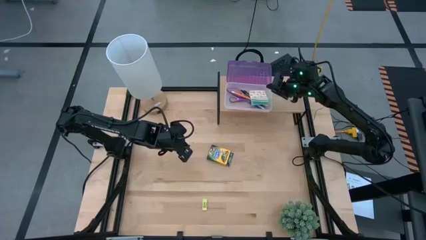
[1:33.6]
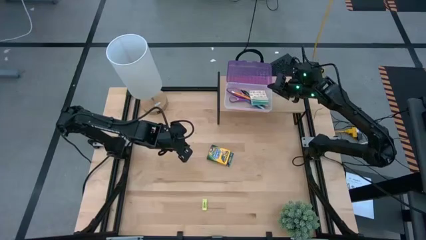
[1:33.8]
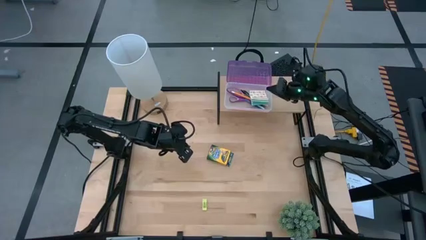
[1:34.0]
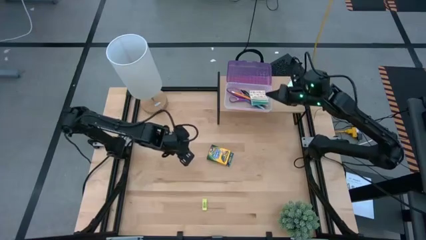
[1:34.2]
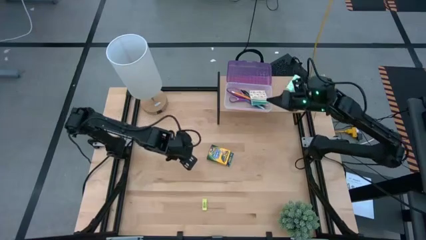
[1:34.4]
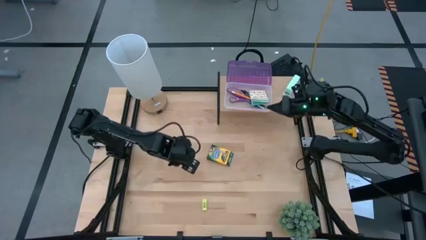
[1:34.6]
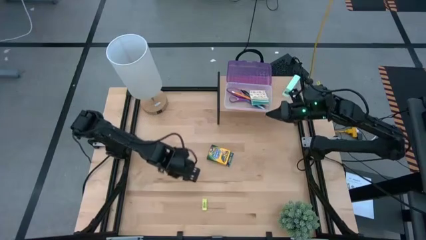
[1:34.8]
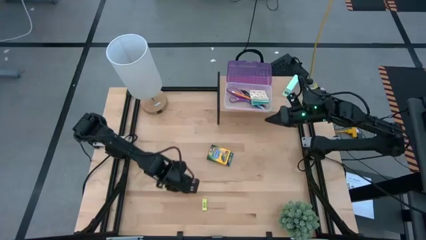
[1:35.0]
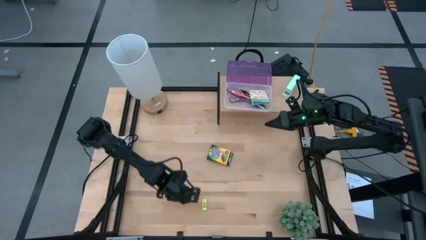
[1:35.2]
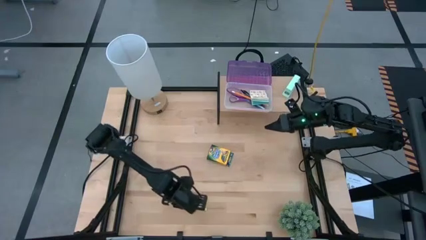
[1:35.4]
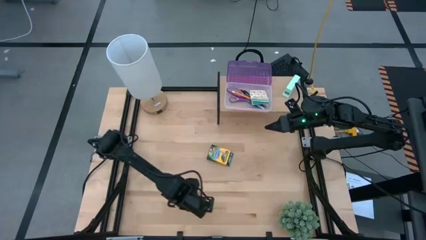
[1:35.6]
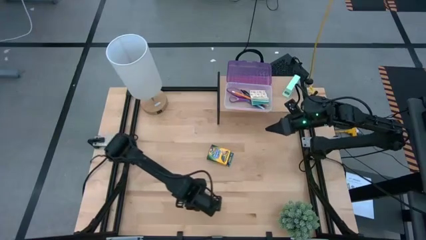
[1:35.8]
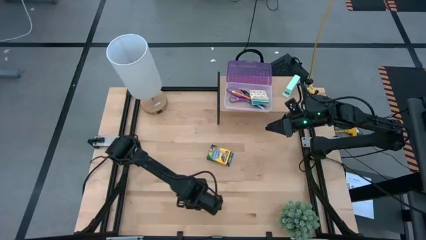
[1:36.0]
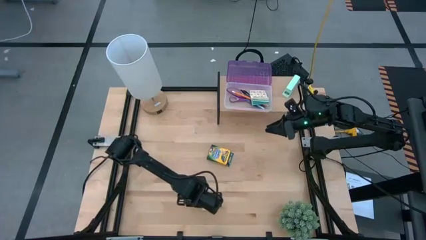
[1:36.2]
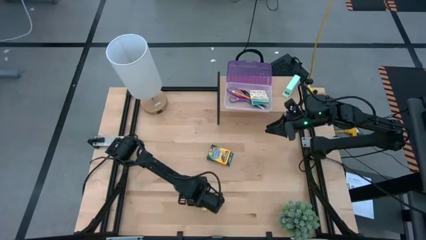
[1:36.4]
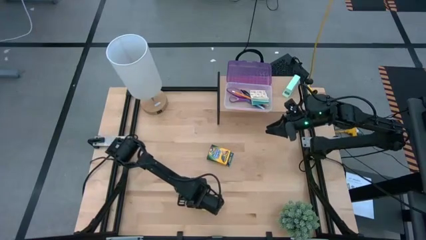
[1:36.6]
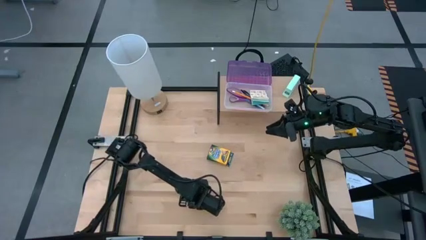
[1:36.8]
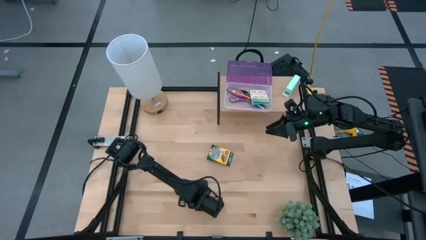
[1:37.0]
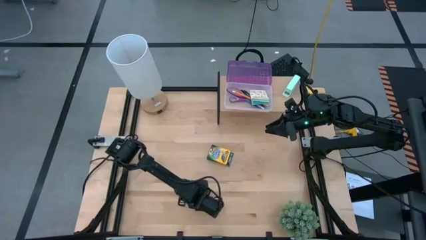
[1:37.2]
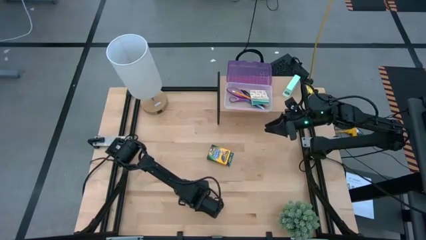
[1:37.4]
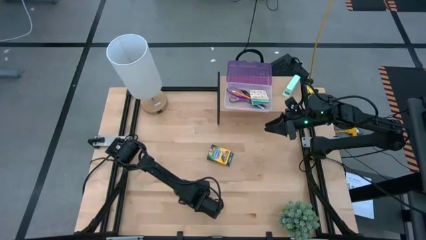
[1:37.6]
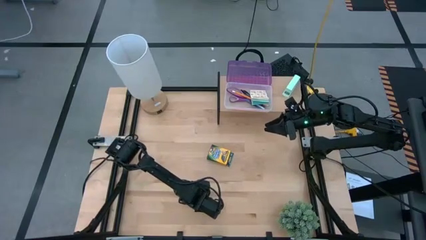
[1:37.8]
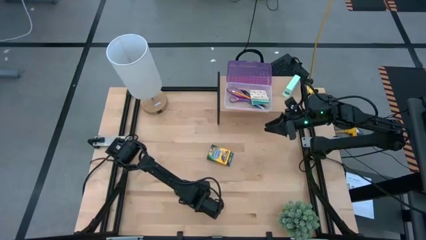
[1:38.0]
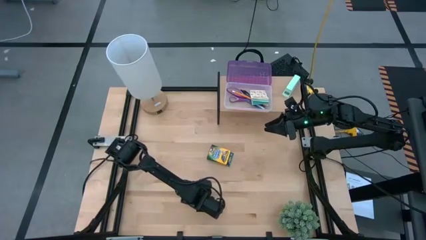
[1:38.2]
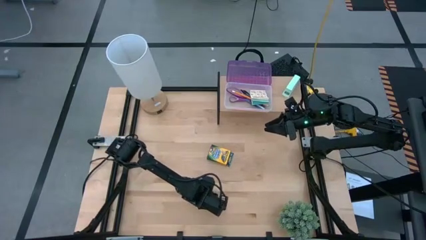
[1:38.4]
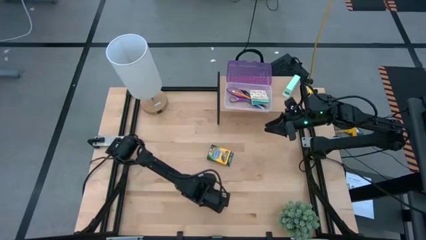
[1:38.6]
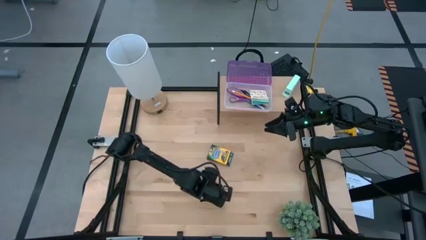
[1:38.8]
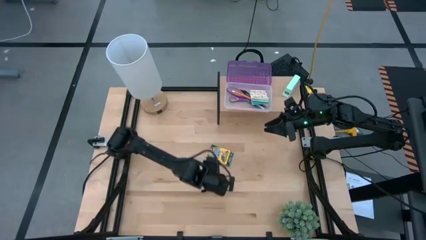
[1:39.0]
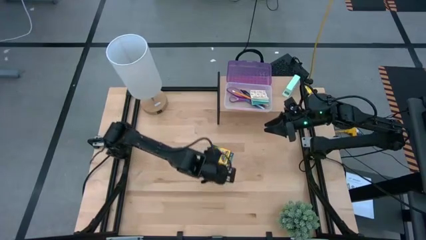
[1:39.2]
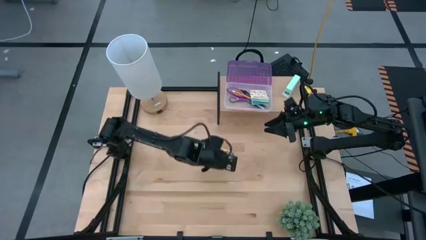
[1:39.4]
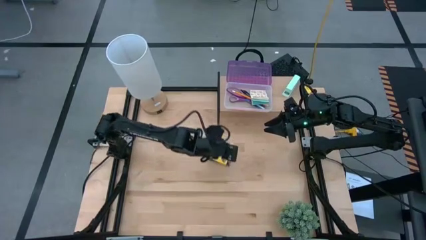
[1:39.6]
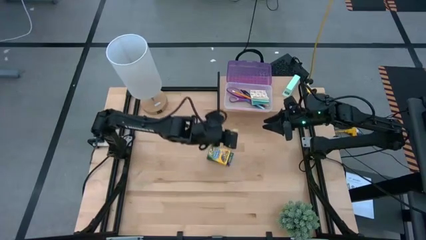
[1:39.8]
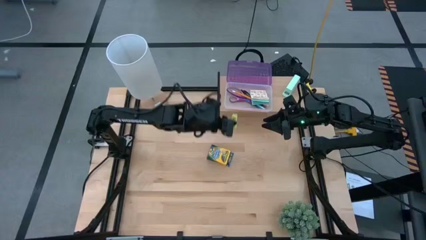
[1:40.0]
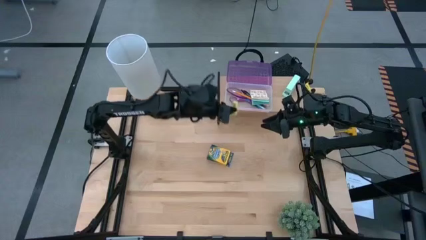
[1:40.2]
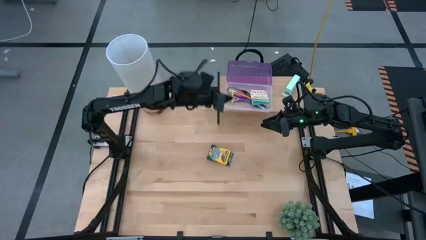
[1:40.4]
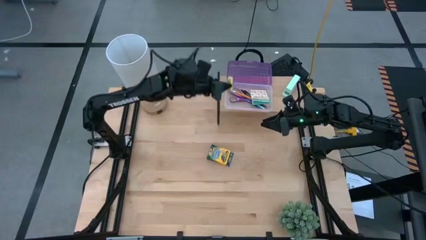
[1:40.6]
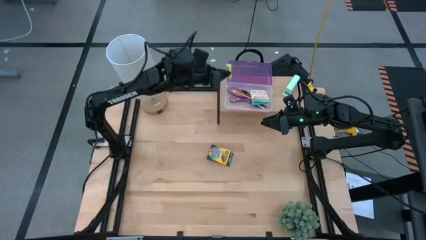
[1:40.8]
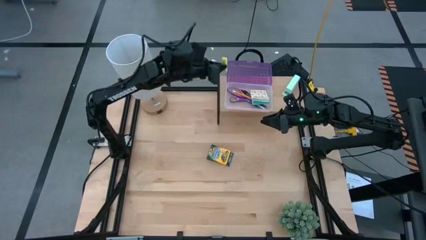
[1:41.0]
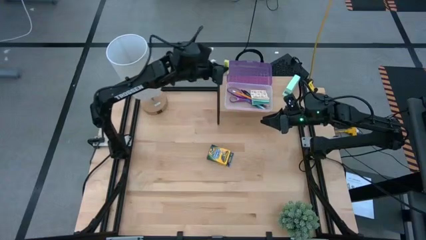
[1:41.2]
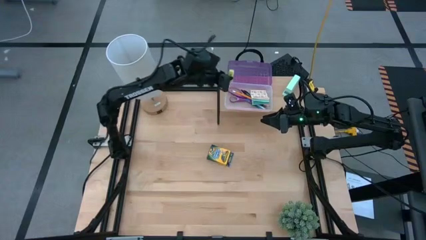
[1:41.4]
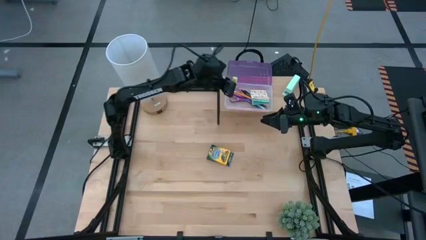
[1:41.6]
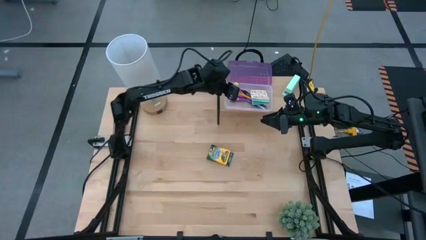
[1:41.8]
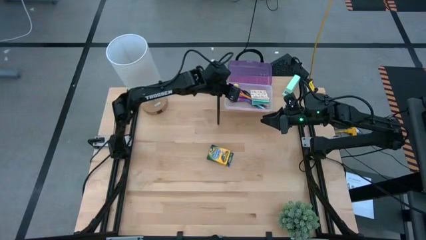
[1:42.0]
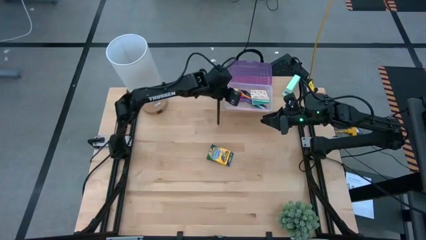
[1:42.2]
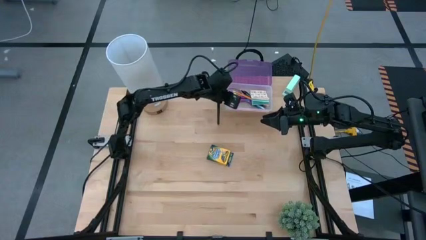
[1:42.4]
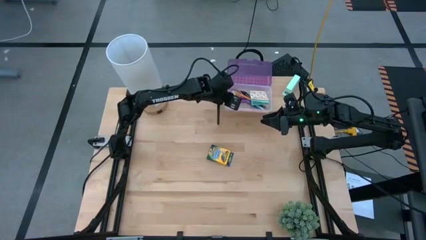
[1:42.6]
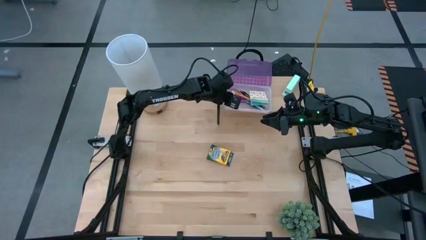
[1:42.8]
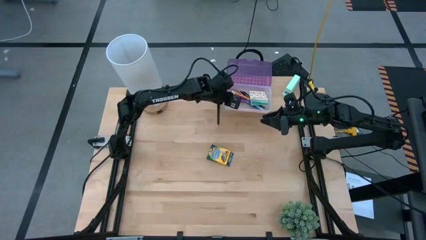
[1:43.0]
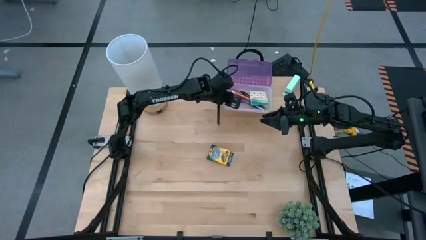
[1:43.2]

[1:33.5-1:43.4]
Task: Pick & place school supplies into a supply box
Put the green eraser into the purple supply box on the shelf

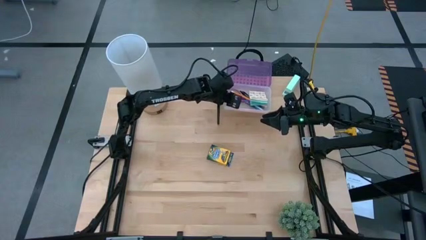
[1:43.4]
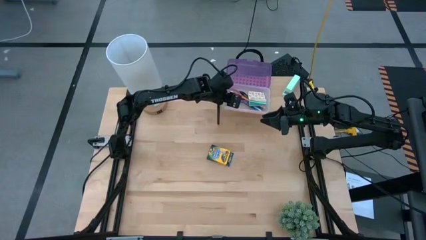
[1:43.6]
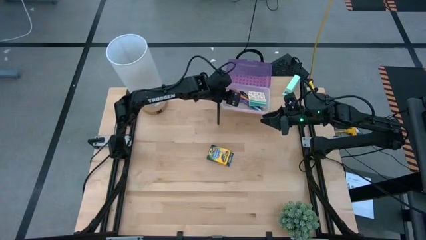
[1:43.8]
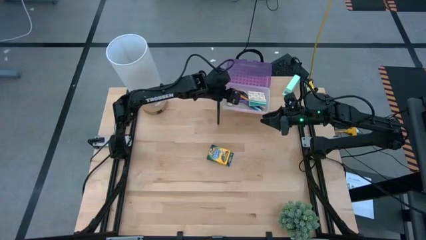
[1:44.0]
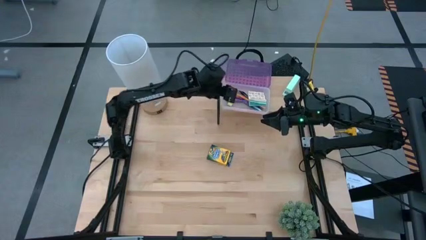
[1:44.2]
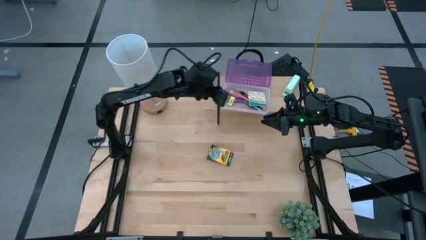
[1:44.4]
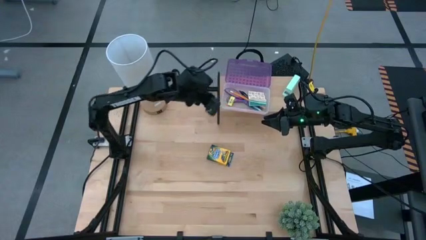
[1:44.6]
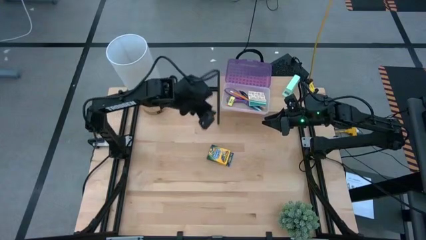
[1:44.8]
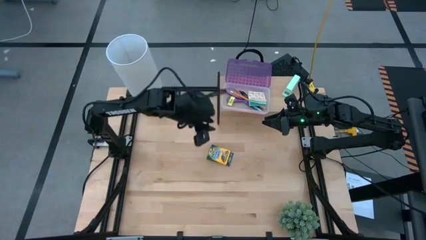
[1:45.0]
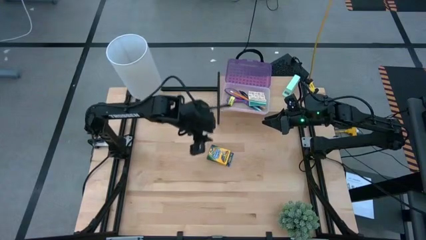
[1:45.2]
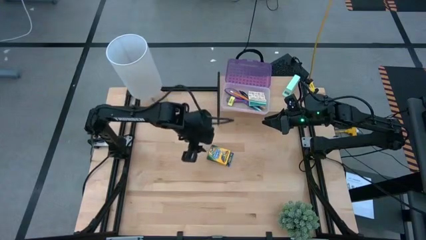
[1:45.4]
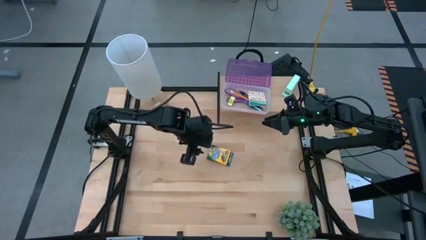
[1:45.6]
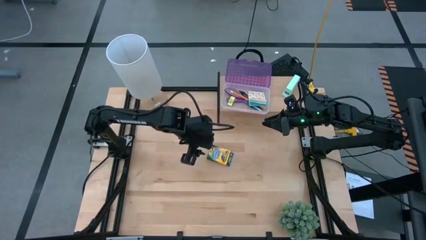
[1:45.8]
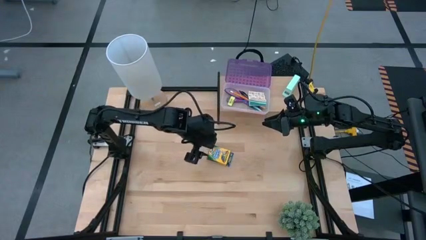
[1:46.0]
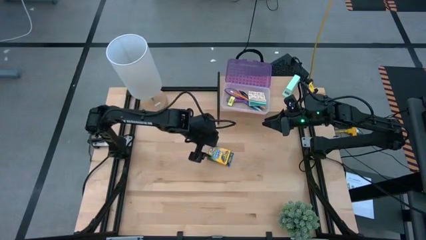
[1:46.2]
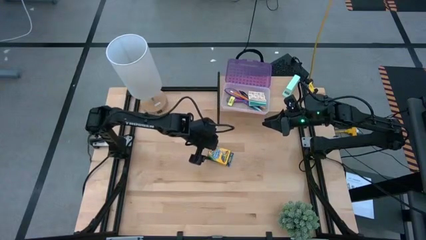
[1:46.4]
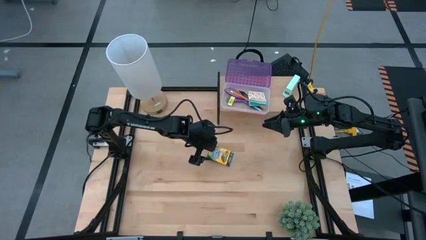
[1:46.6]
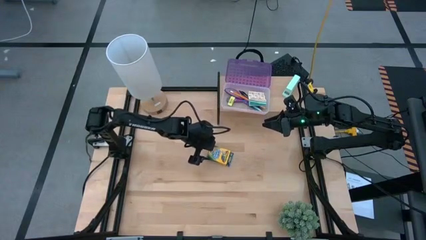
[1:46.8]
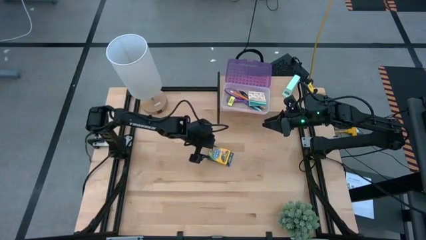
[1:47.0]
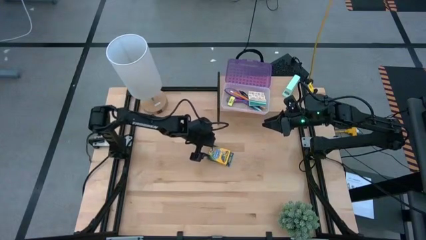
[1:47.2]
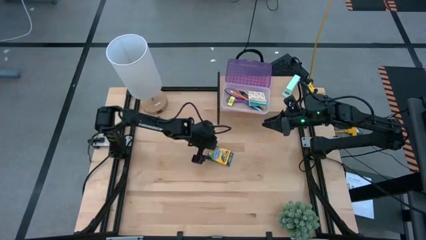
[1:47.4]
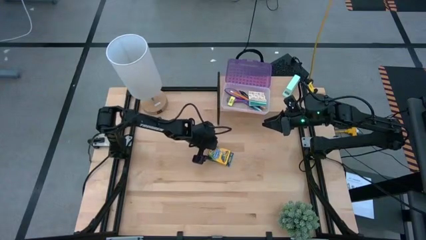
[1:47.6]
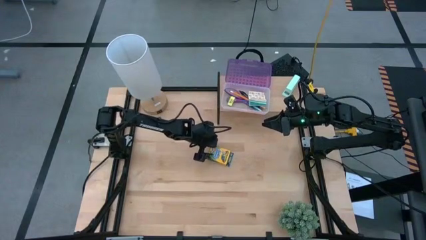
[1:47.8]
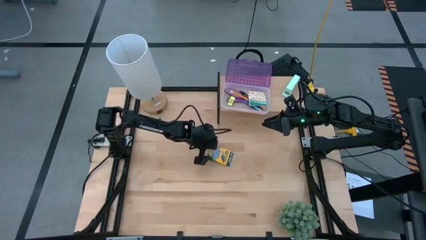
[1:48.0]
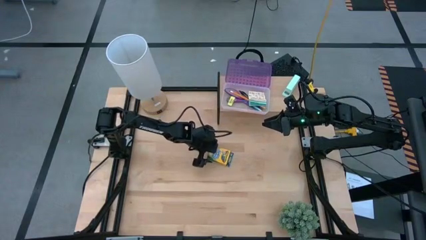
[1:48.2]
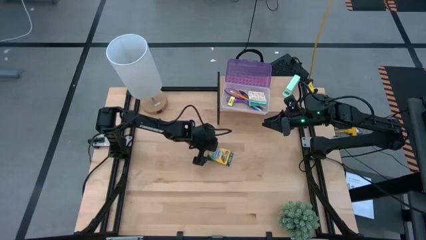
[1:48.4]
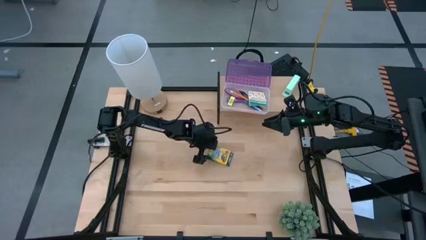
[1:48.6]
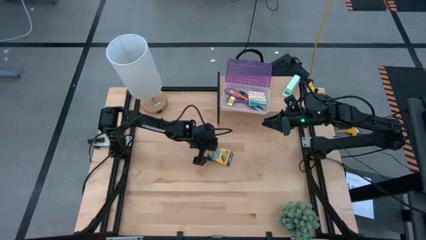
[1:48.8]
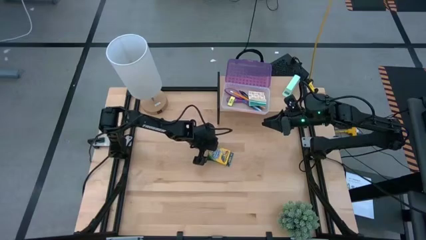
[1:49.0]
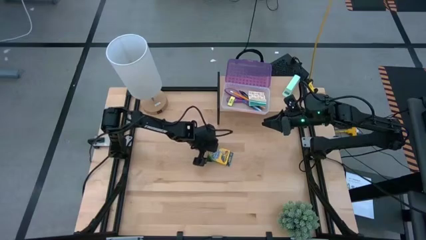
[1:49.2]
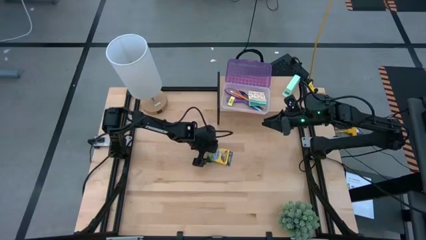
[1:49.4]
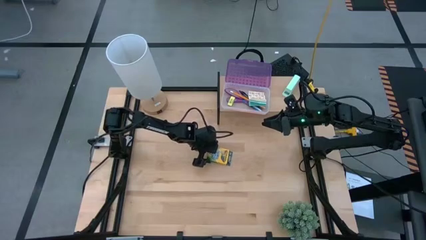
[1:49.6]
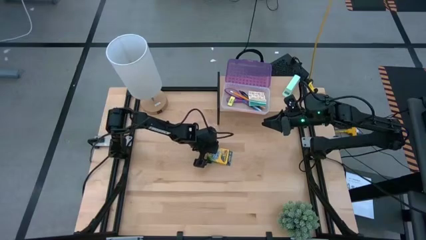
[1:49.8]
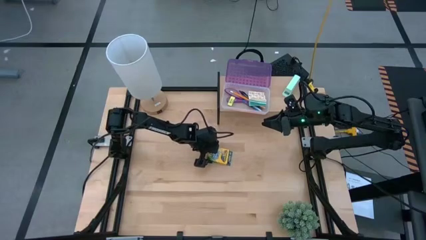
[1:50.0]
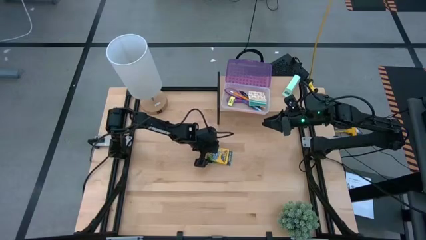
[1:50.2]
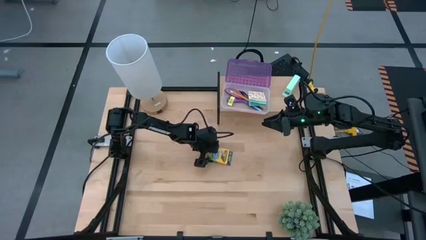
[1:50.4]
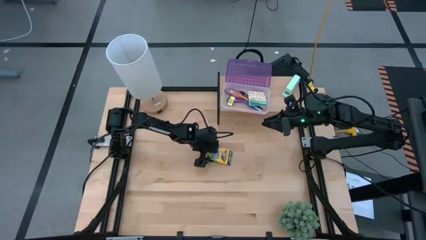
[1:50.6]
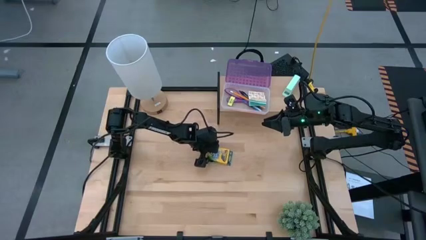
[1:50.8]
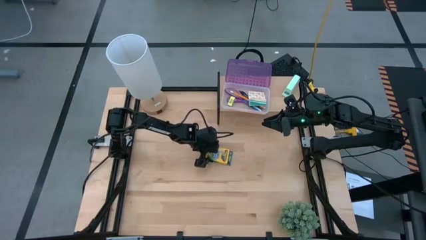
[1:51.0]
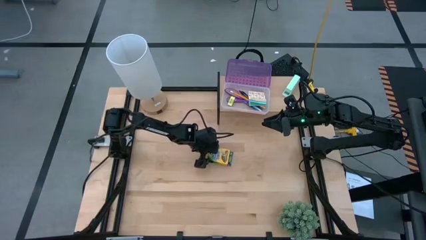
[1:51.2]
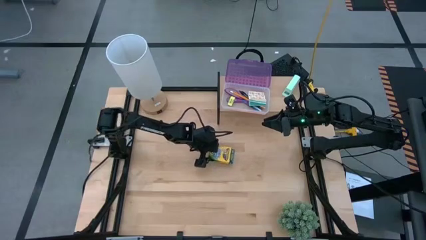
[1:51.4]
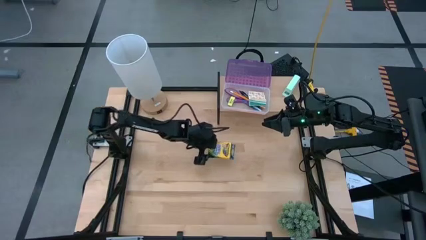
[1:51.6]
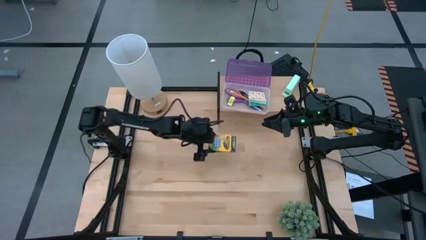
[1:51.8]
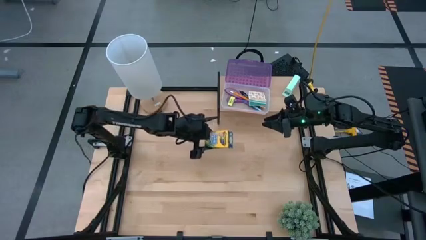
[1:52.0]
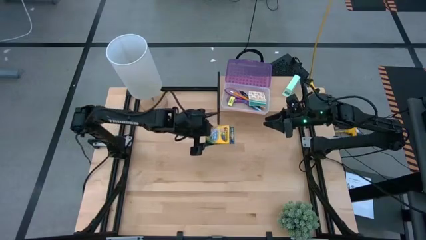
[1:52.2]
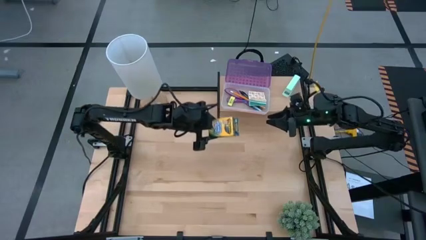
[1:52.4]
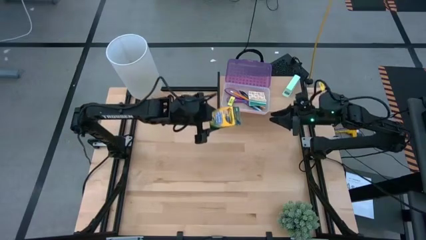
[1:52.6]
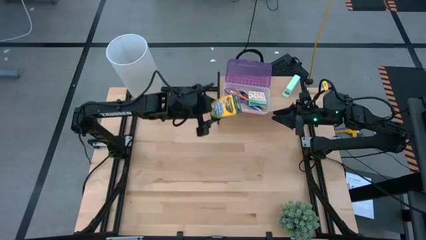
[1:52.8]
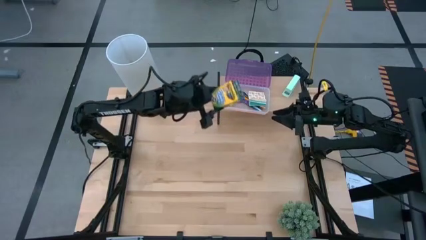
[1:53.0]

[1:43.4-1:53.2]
Put the yellow pack of crayons into the purple supply box
